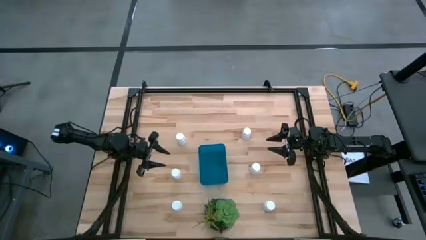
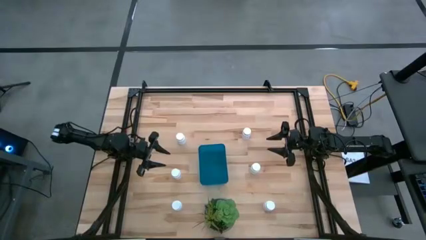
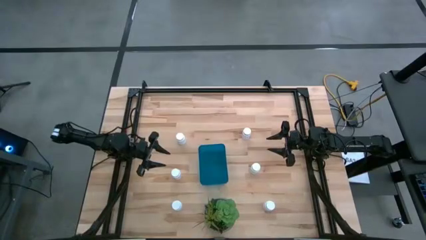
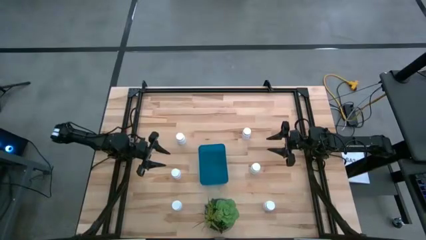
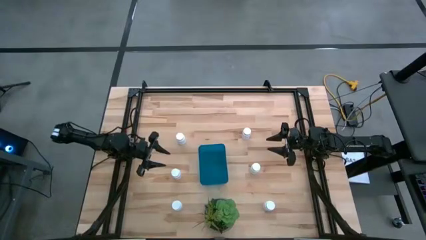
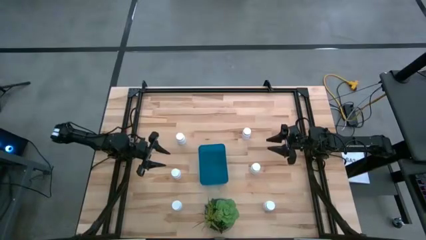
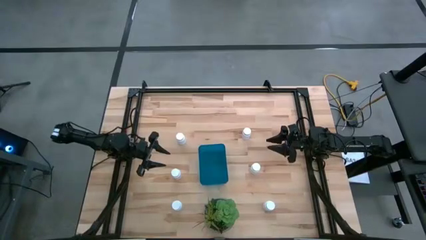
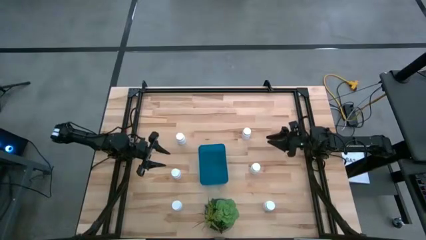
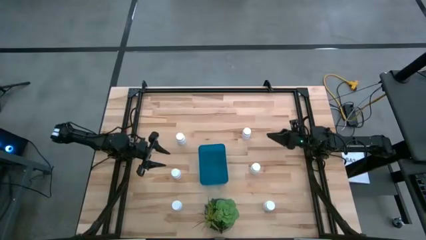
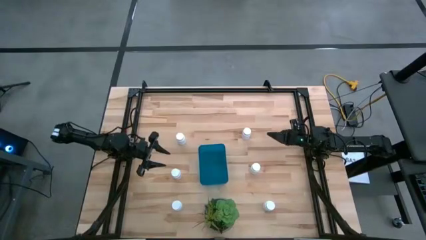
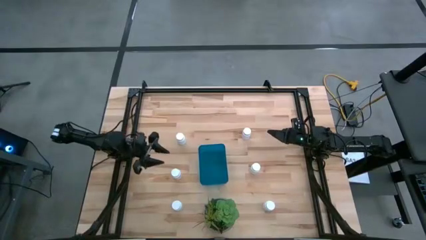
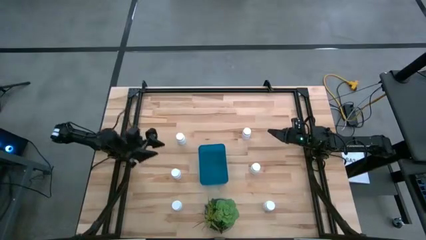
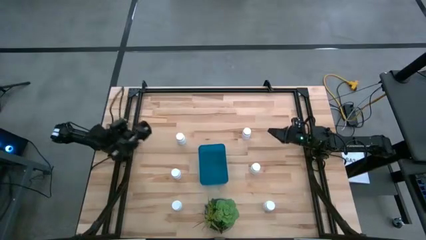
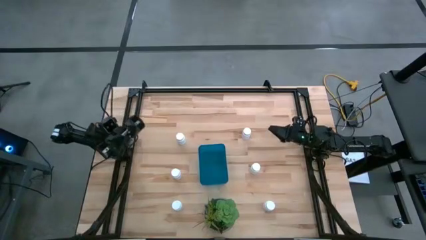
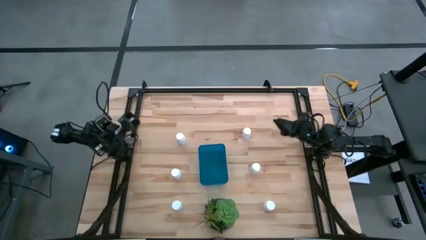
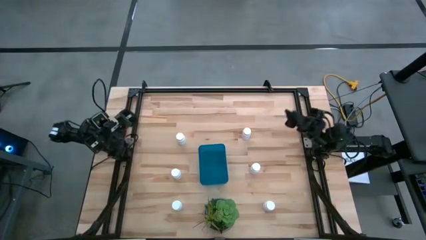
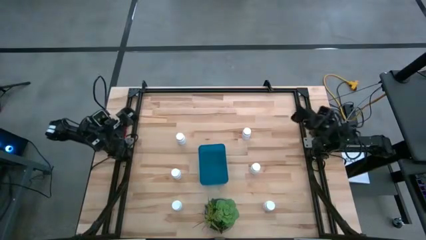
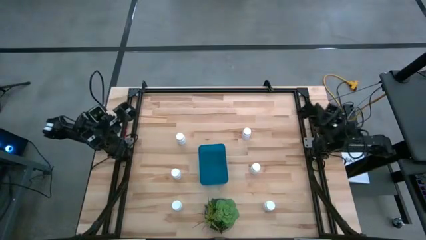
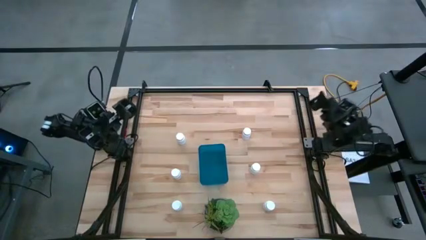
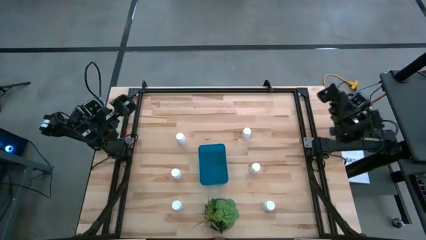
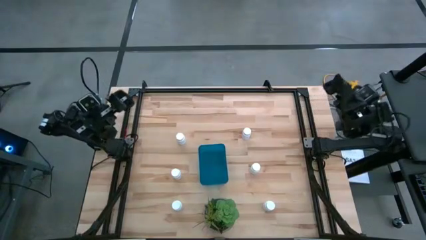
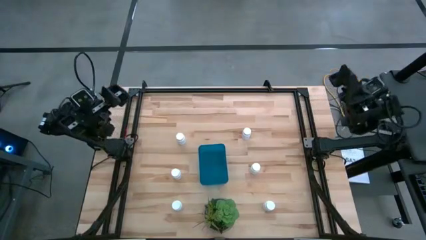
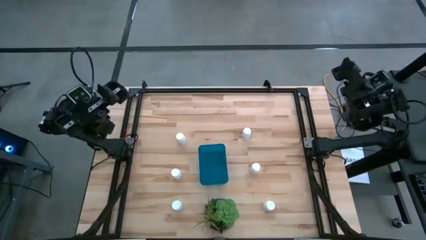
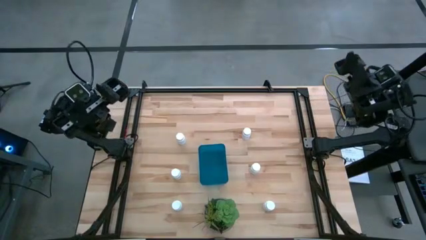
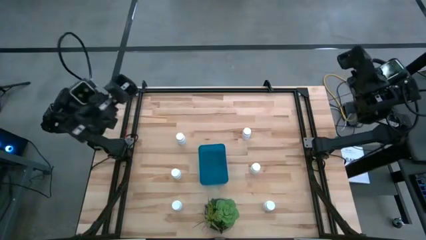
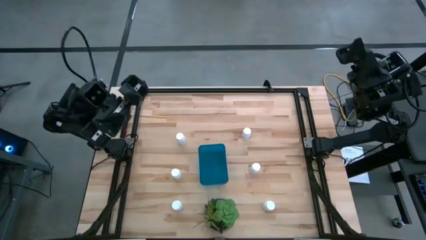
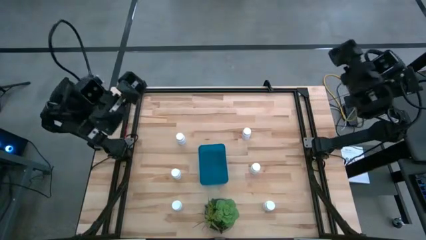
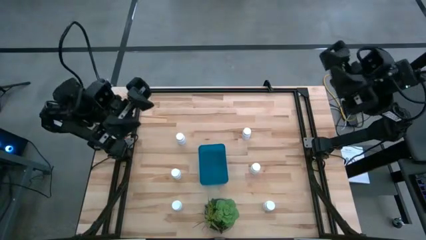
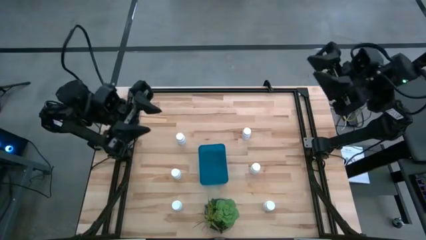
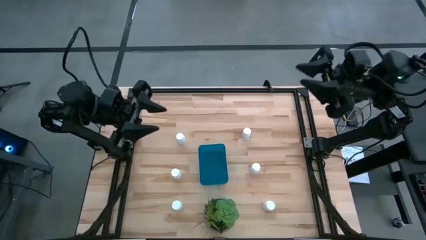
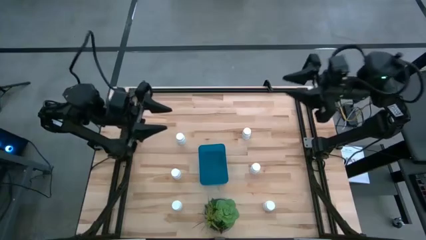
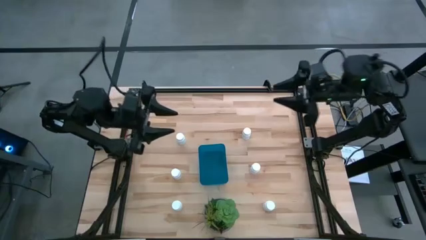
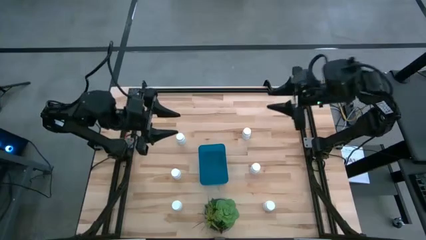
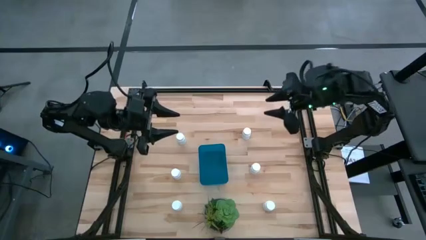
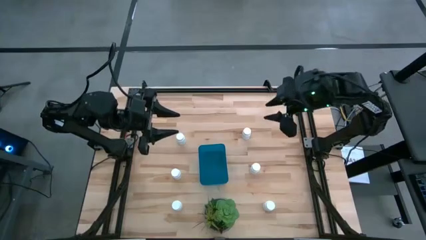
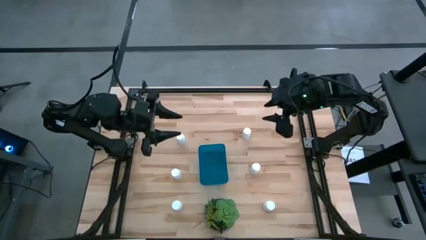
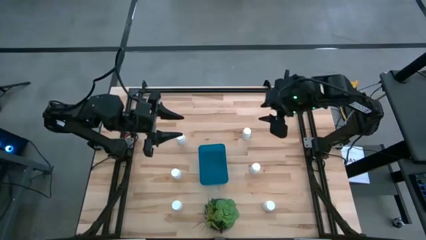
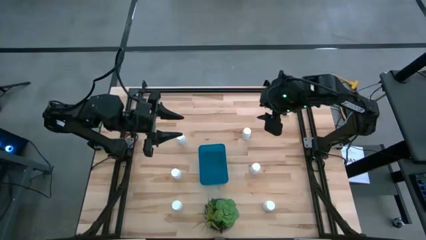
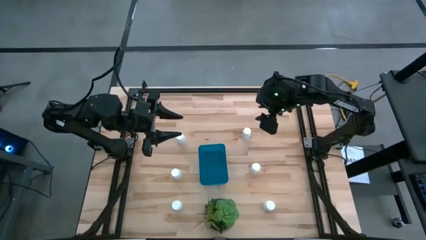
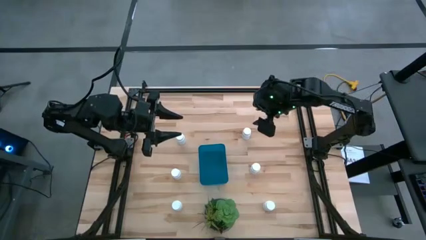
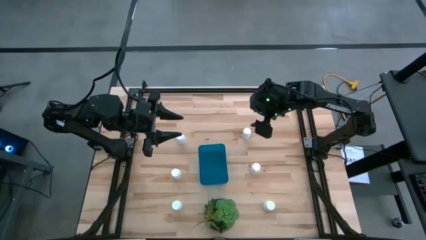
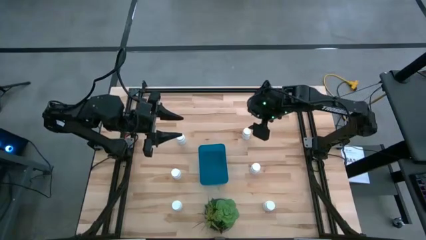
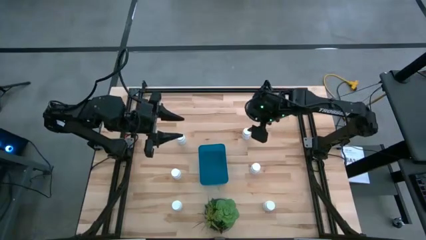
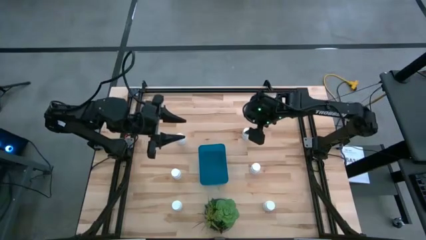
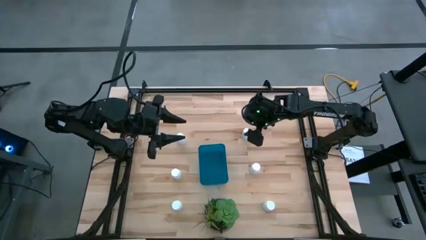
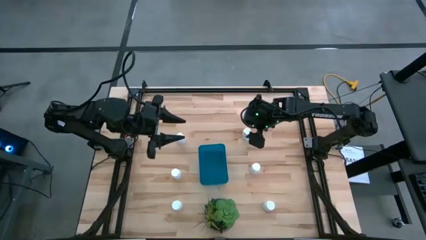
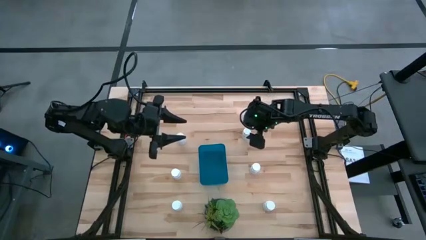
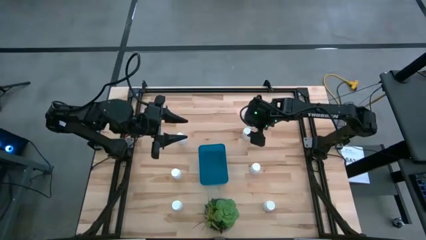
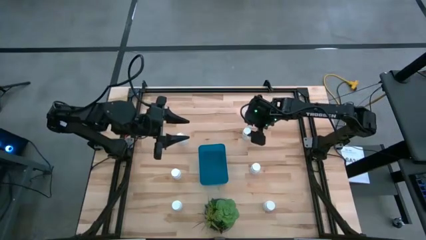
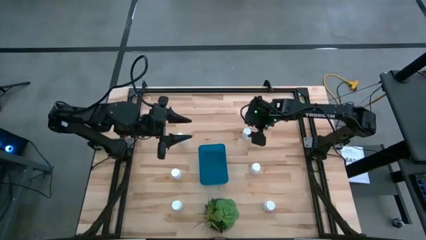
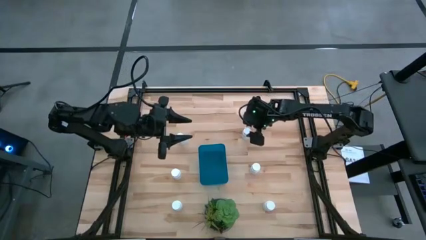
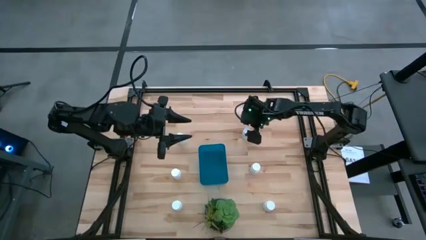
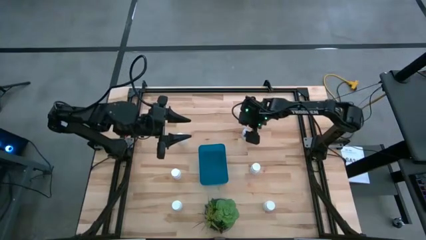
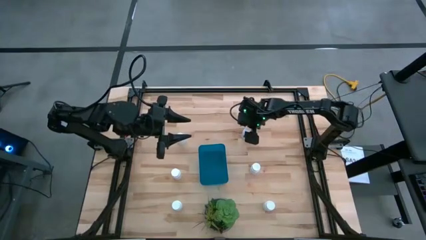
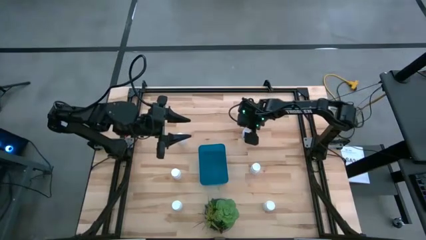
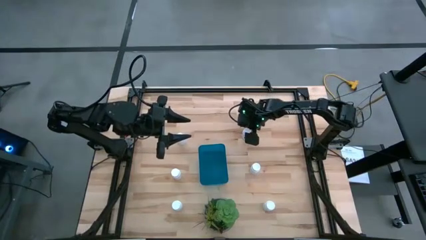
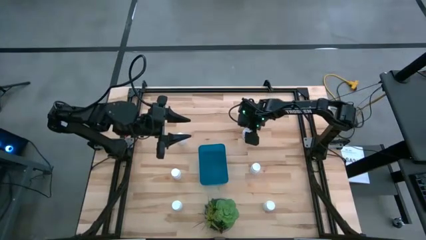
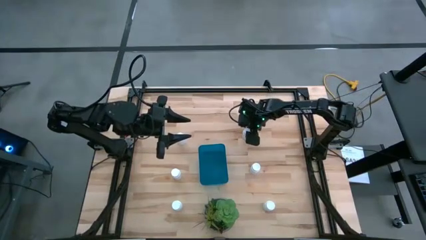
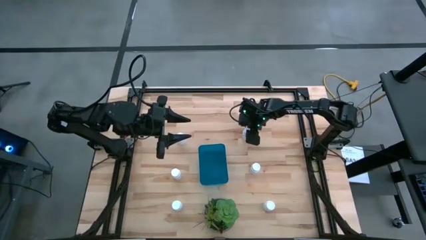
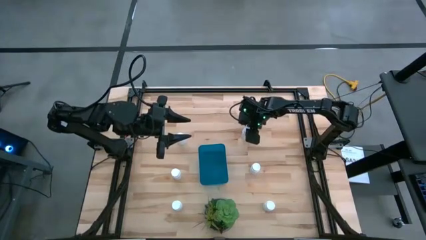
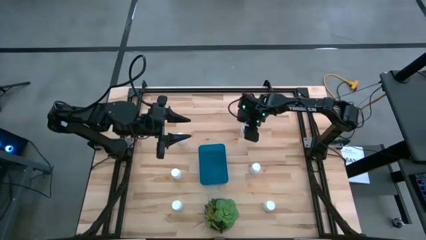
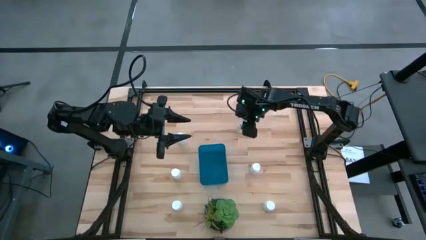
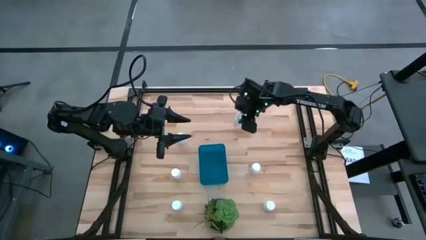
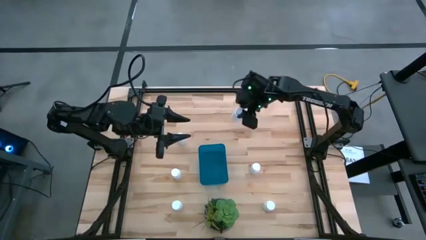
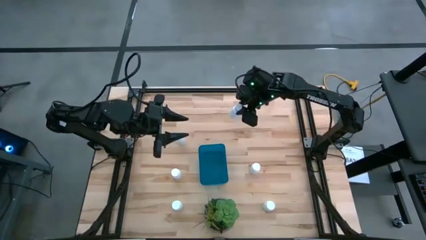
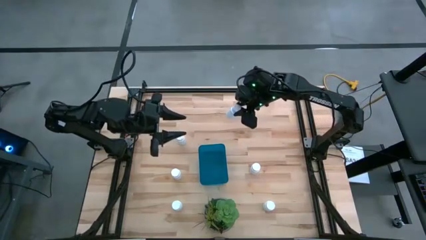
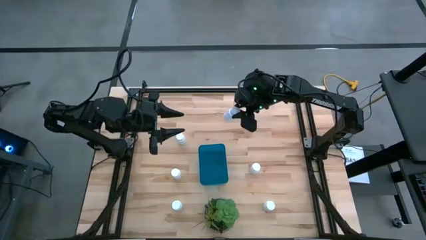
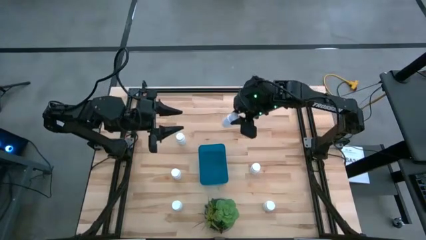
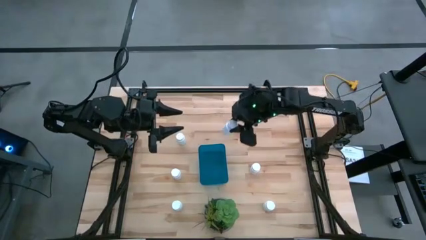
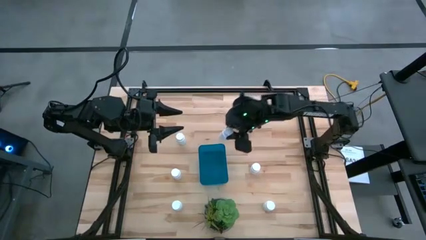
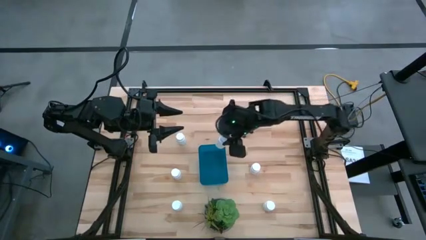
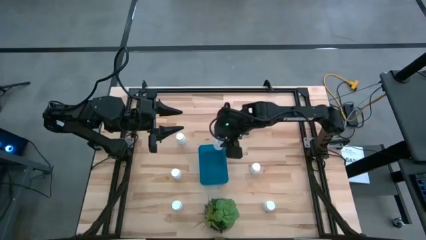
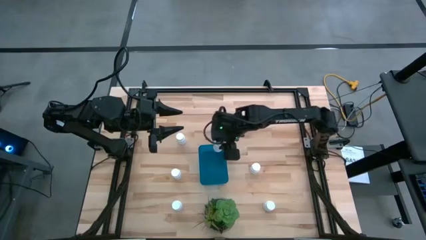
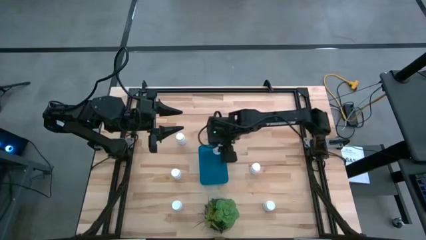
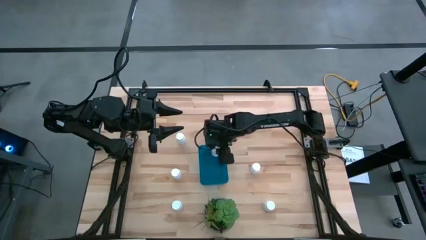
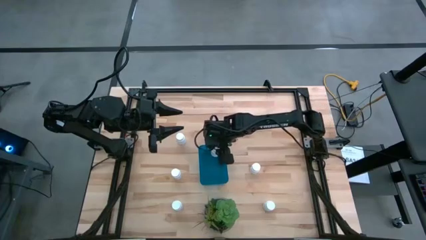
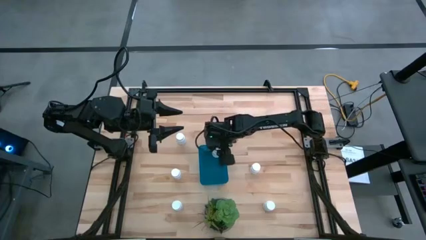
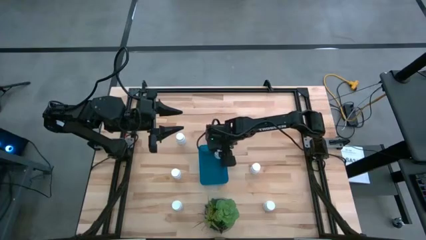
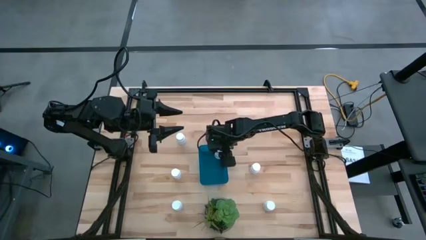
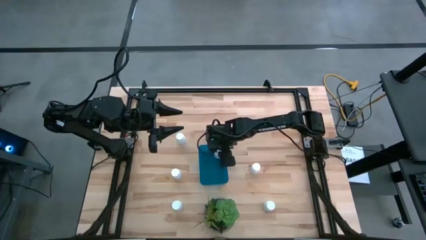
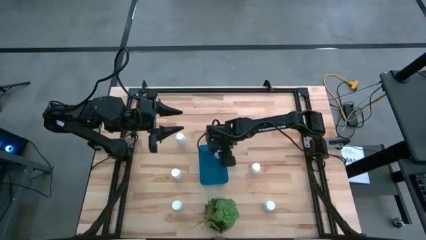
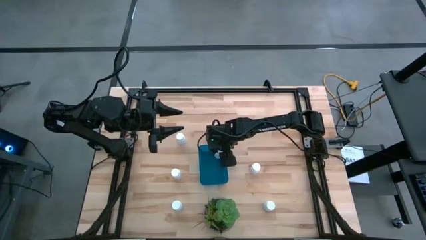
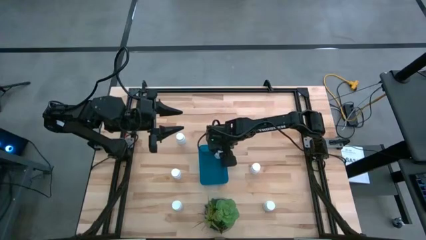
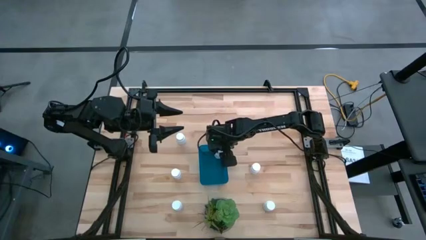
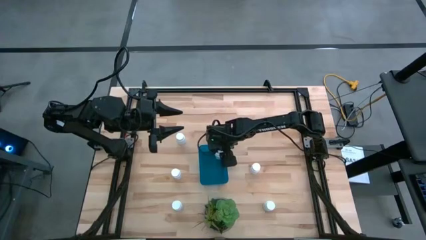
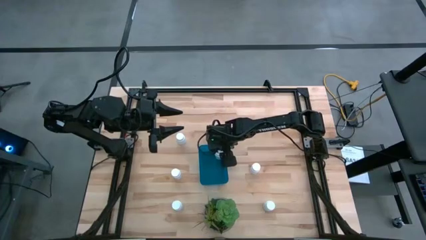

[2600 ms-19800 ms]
Task: Pick and place pill bottles into a basket
Put the medicine bottle into the container
